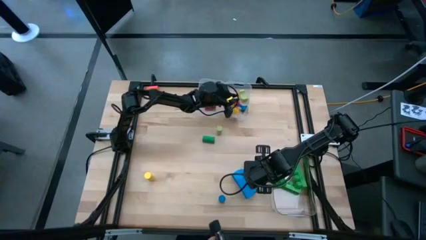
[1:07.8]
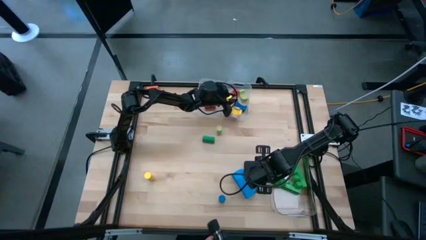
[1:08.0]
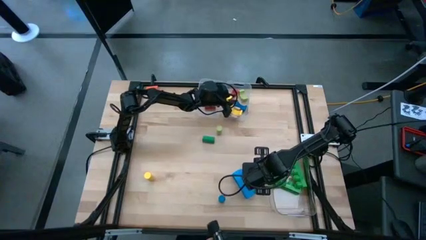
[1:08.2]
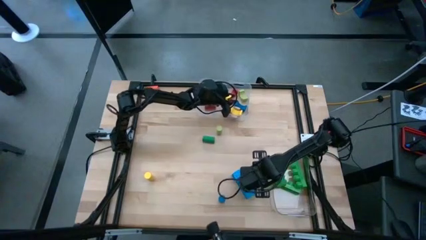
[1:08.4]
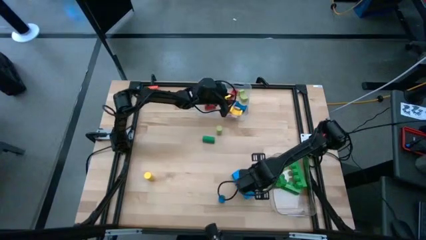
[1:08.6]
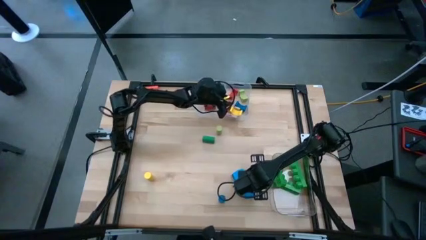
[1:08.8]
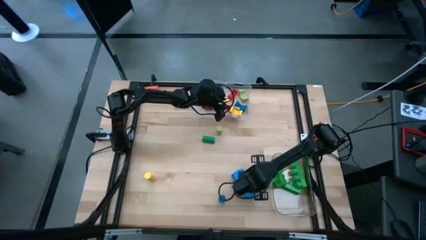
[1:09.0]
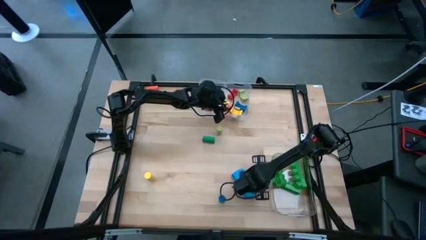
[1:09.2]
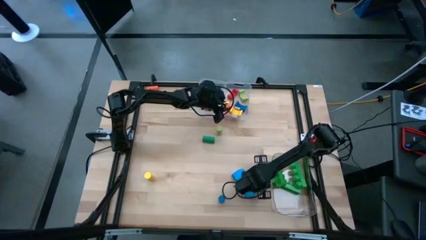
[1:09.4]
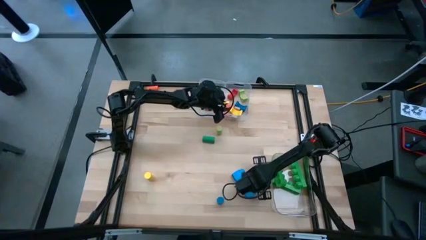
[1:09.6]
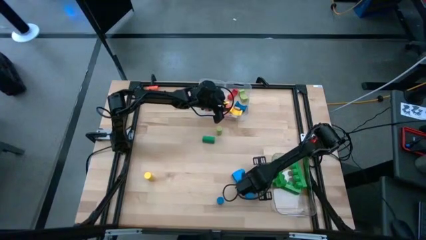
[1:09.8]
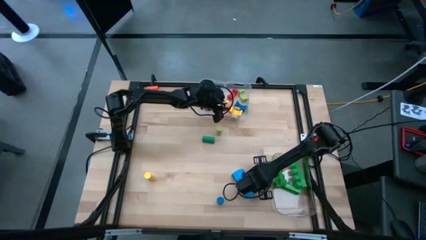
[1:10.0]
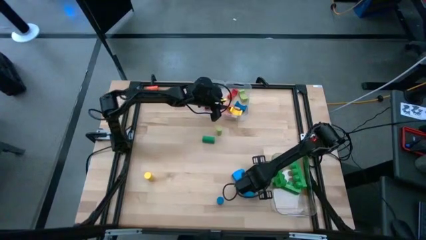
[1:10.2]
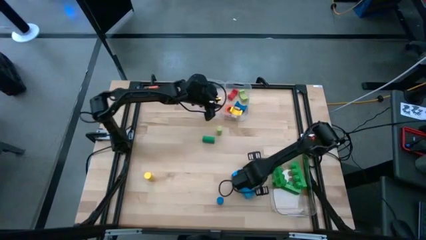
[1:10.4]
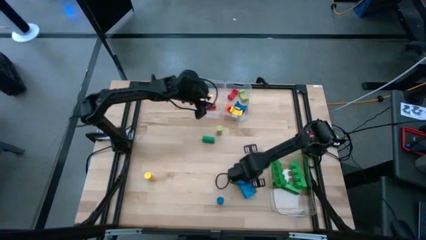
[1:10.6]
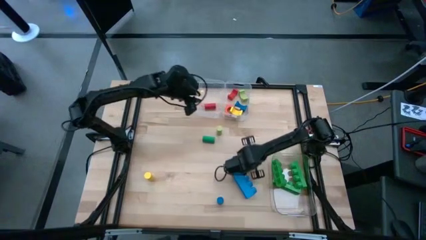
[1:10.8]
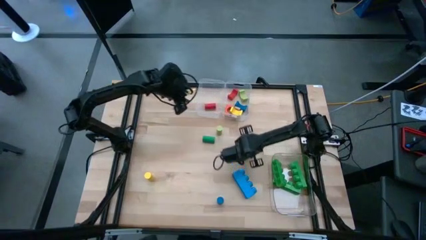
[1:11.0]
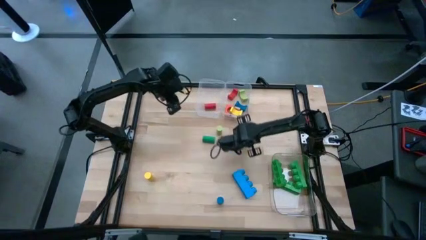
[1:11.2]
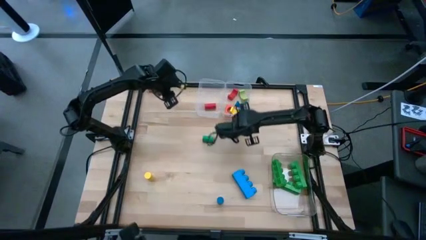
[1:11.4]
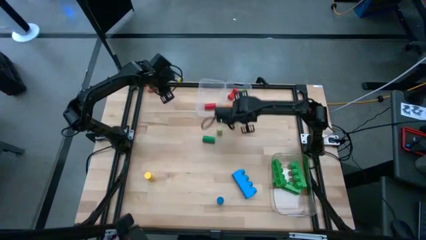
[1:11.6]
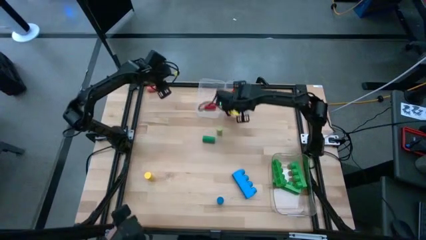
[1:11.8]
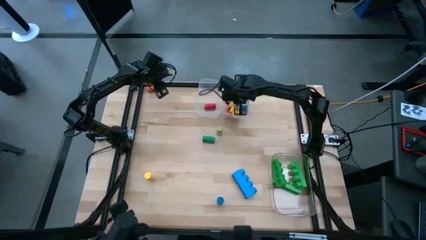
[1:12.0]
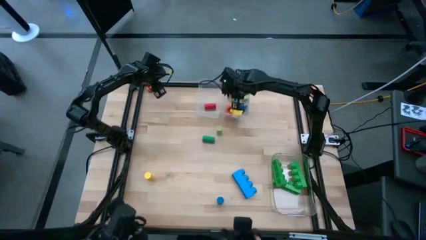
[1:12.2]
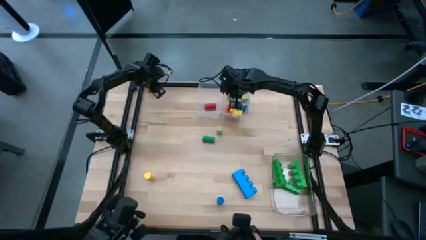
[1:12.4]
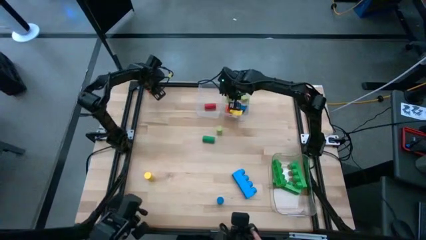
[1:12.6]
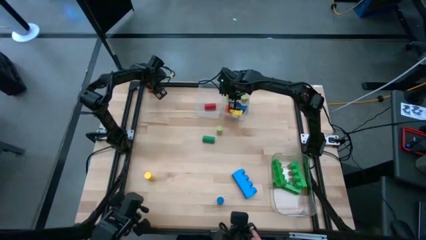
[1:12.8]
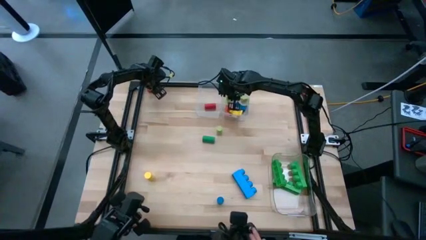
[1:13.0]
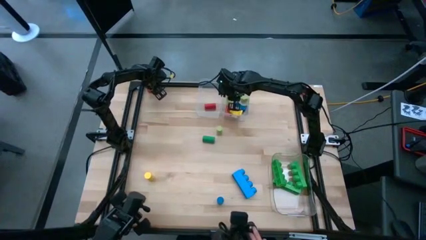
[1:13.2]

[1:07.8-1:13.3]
Task: Sort blocks by size
Put the light green arch block into the right transparent bin

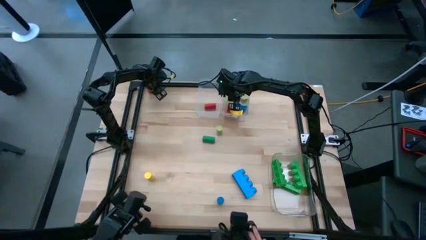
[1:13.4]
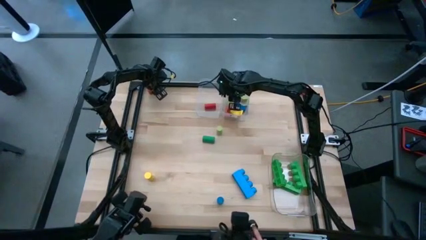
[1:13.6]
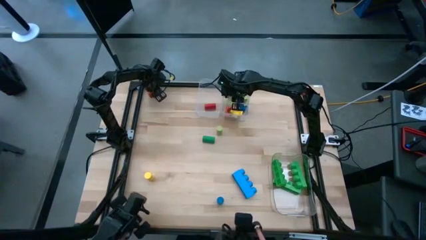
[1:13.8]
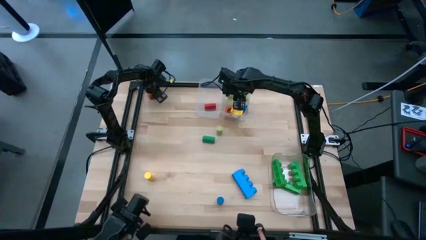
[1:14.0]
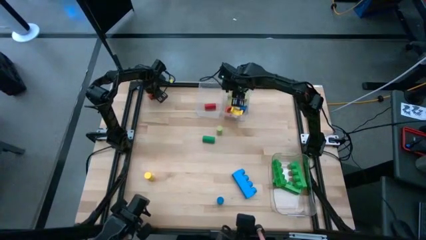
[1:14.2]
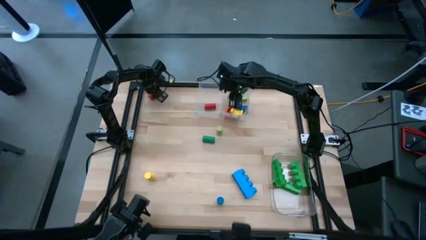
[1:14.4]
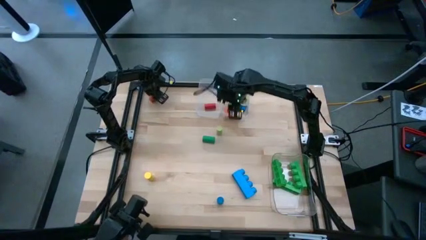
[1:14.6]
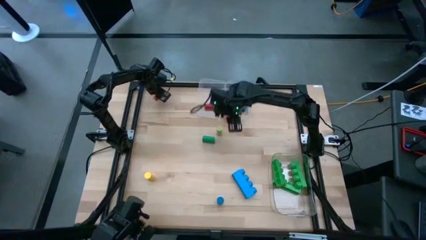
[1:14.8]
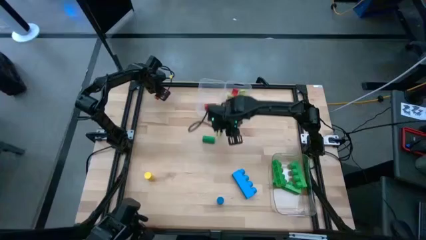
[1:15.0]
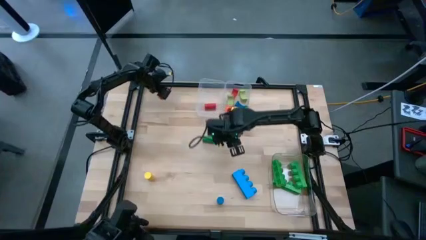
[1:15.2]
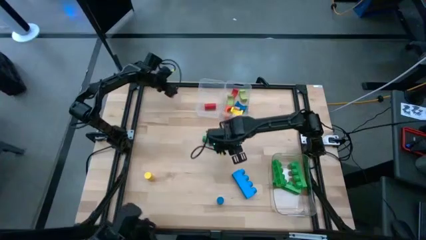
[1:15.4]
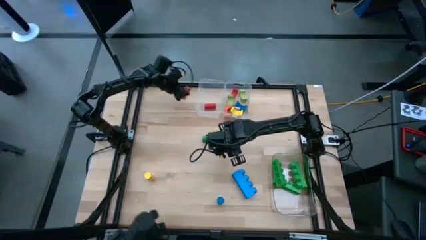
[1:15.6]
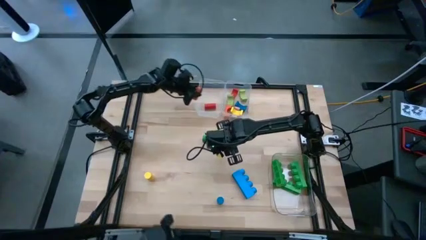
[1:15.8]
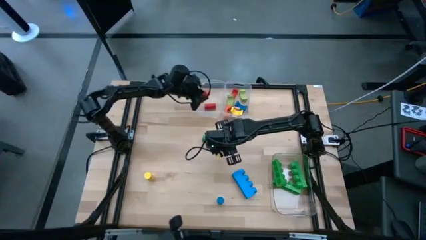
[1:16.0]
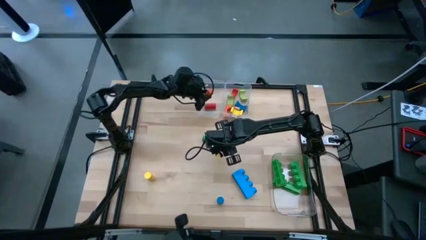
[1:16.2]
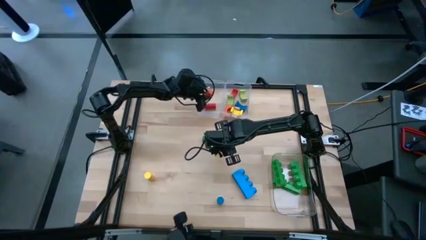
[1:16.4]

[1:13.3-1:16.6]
Put the orange cylindrical block into the left transparent bin

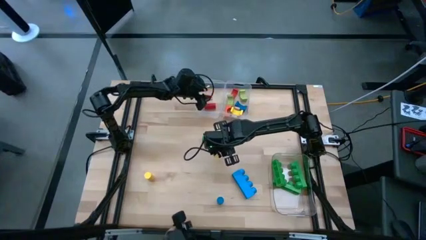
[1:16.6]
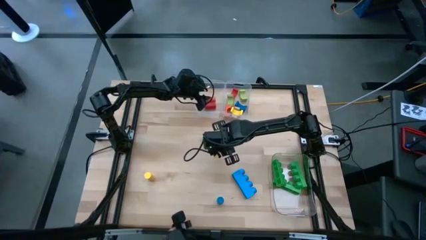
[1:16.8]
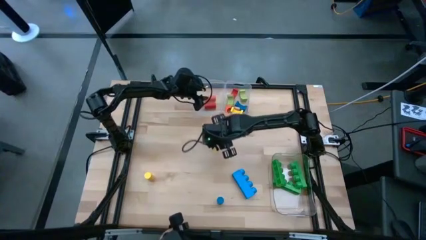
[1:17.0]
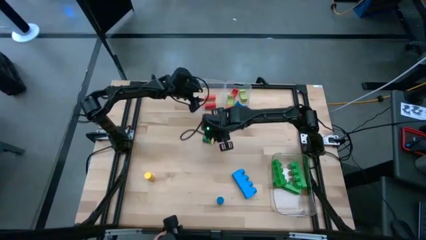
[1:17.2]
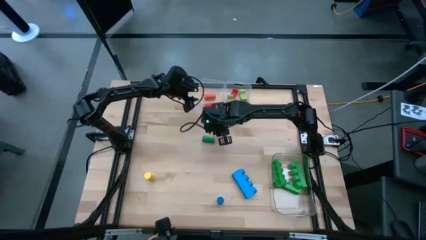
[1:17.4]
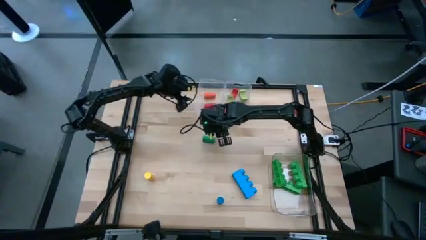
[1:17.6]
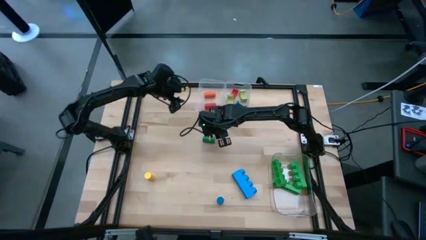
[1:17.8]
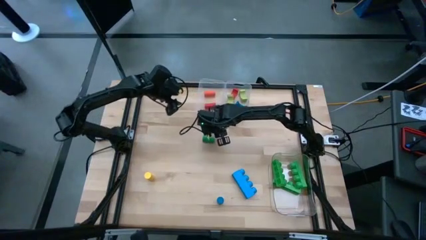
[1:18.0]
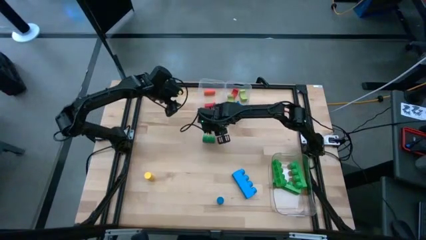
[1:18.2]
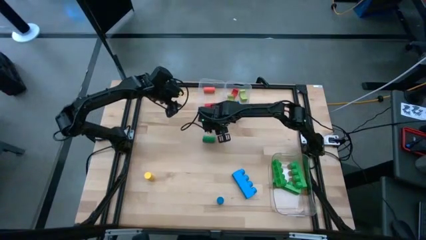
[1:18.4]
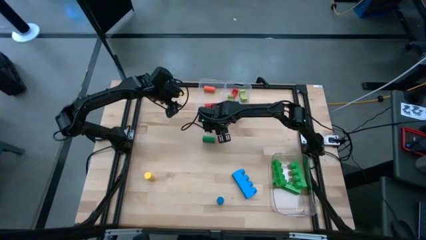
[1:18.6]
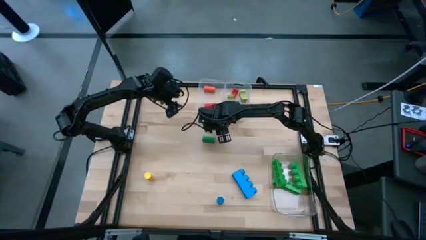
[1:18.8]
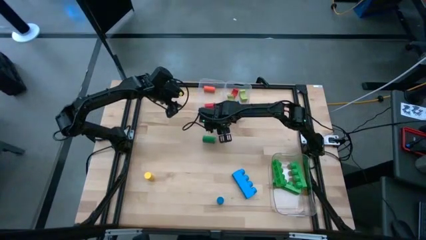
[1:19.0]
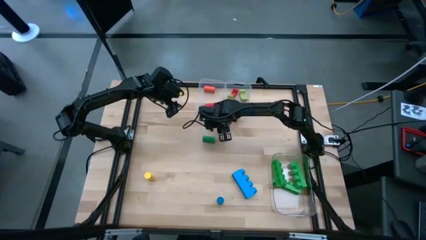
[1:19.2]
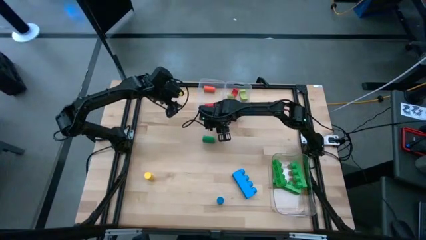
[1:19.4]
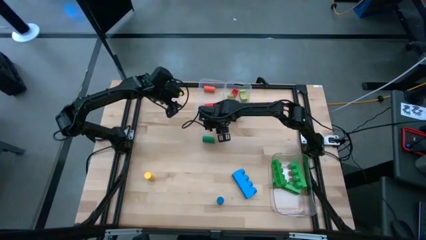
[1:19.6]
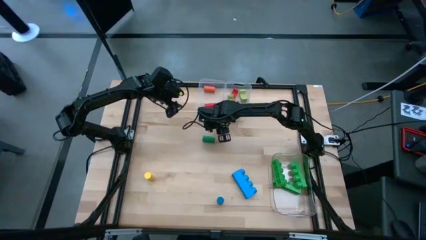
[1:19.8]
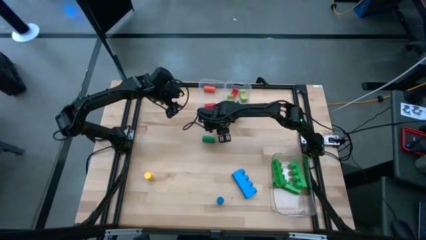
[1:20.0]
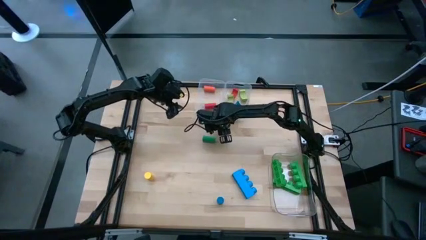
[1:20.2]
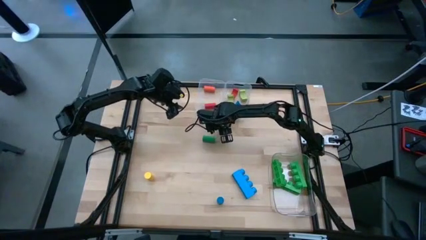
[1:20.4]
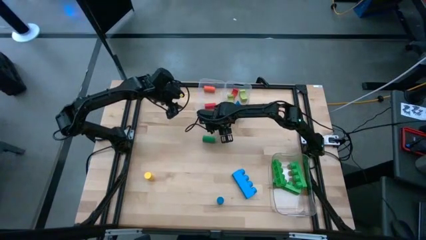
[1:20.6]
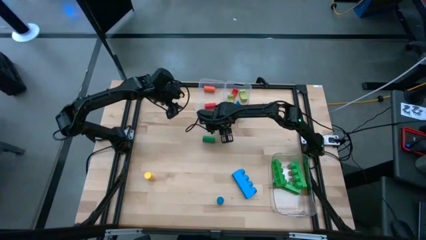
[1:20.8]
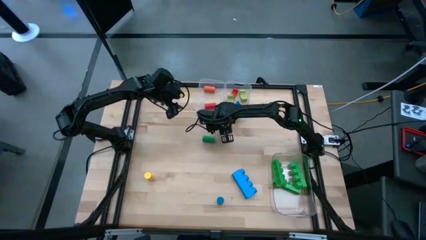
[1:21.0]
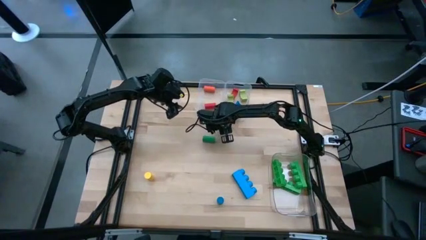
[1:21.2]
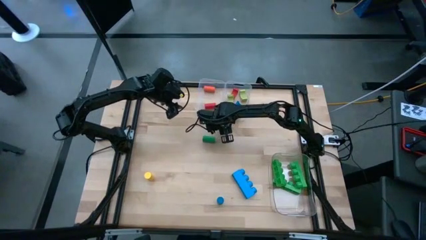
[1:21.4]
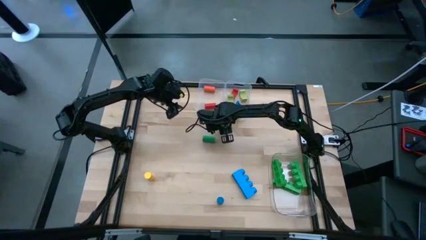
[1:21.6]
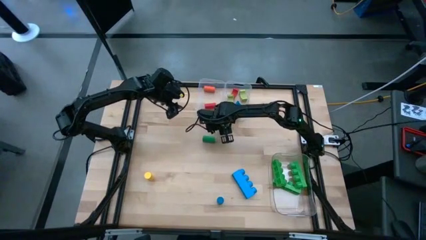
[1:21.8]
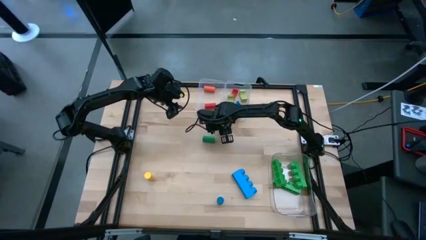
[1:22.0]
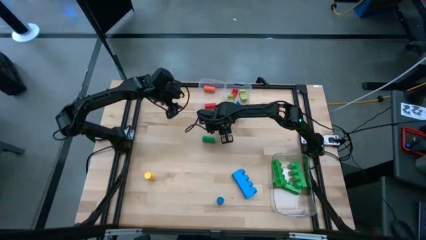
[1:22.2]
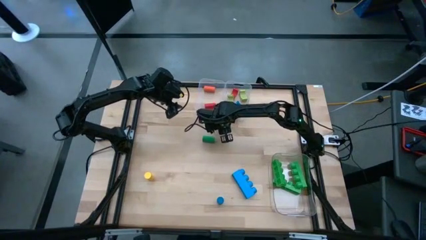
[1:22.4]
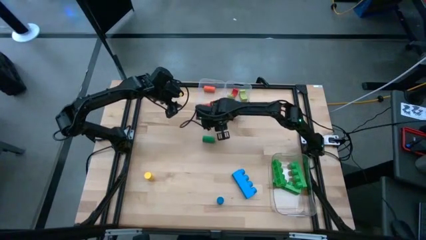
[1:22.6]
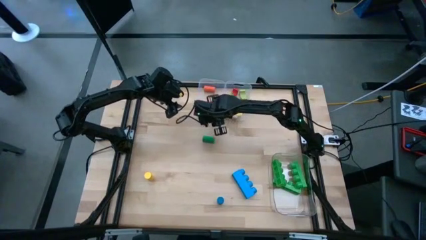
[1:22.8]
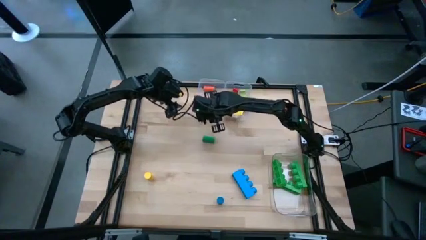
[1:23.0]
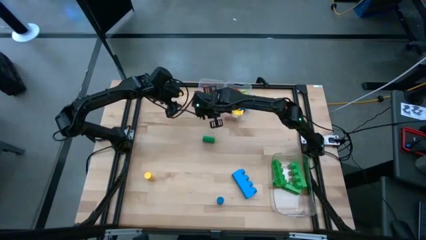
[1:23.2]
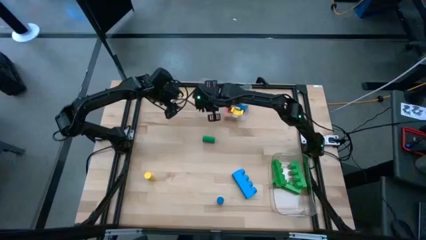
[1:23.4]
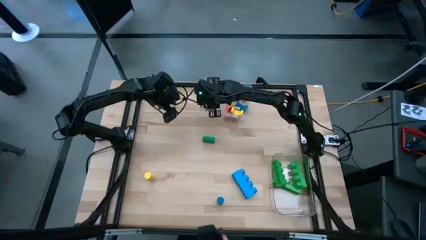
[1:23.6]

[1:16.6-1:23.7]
Put the light green cylindrical block into the left transparent bin

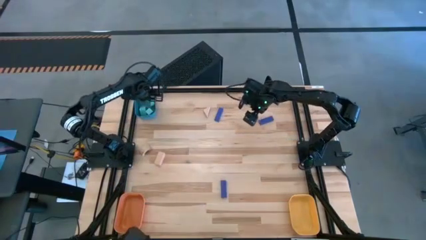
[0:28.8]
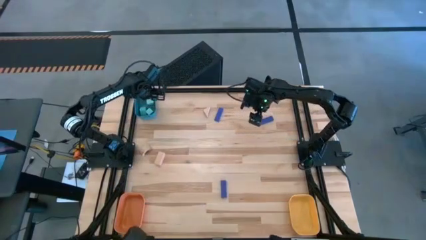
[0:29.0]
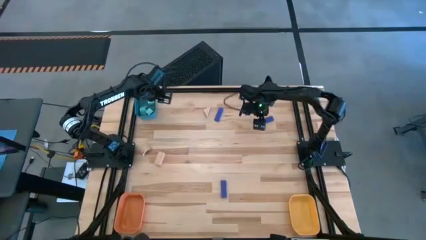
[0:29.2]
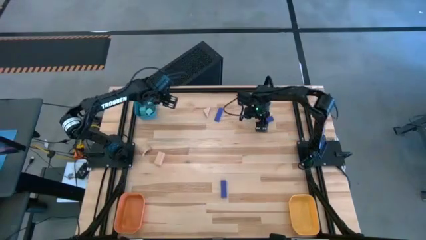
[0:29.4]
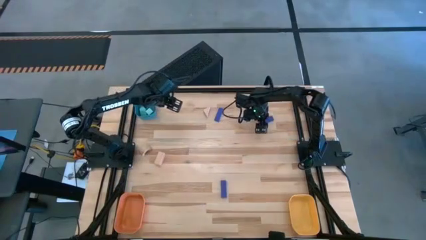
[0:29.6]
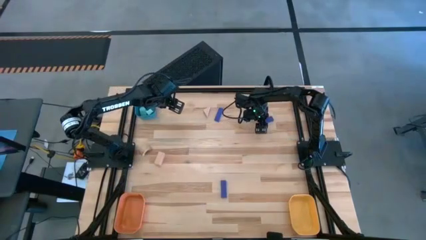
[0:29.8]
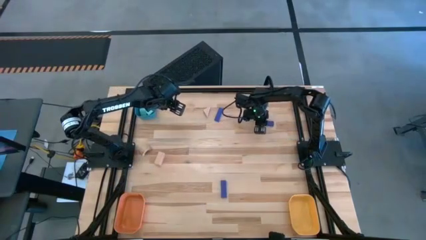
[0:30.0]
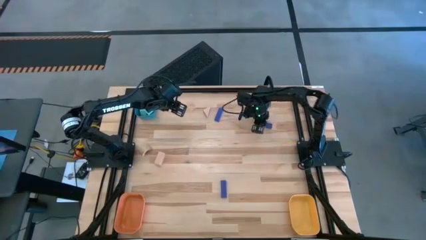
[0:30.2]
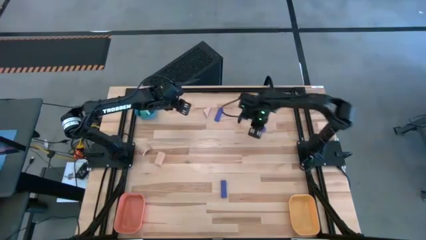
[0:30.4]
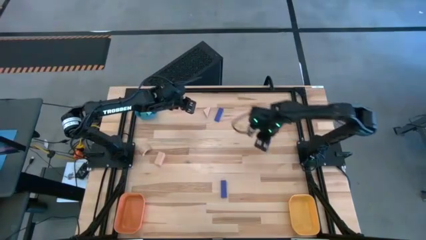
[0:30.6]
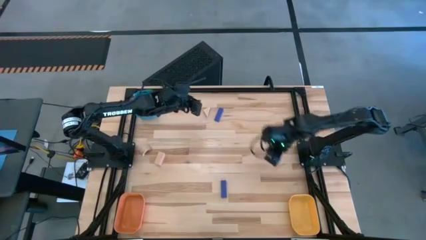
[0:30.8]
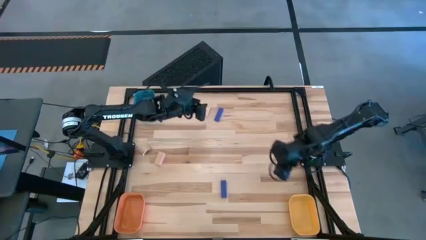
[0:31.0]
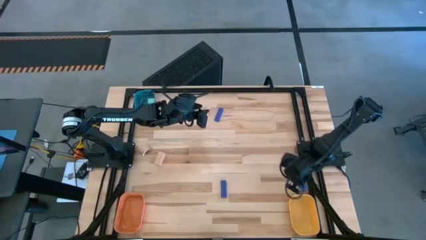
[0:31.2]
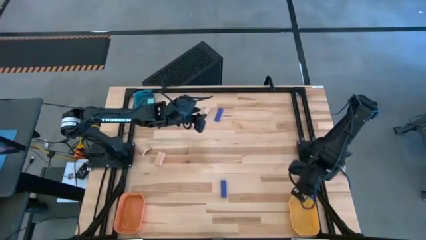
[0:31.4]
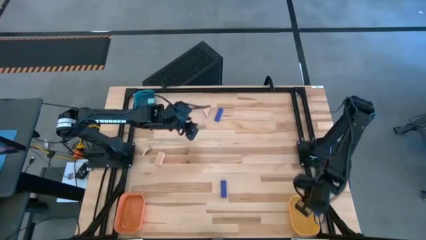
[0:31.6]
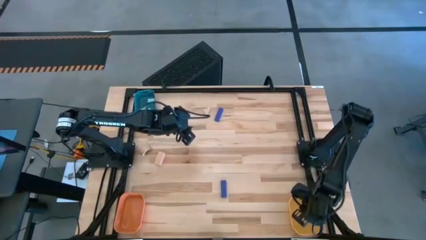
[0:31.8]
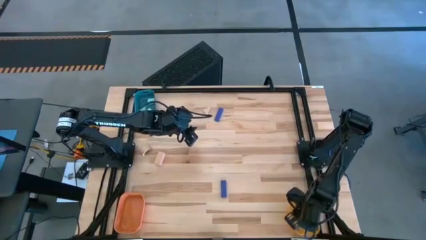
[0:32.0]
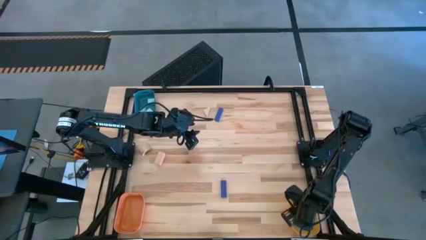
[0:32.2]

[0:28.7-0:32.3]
Task: Sort & place blocks by color
Put the top right blue block into the yellow bin
